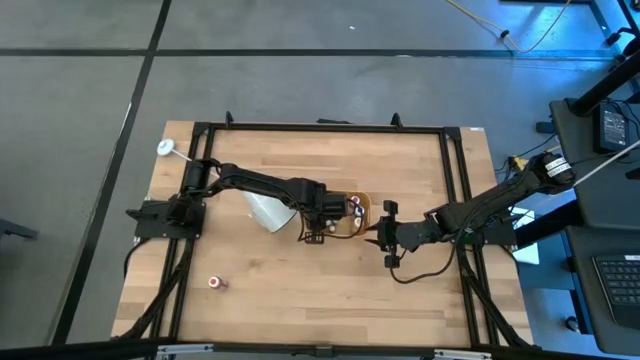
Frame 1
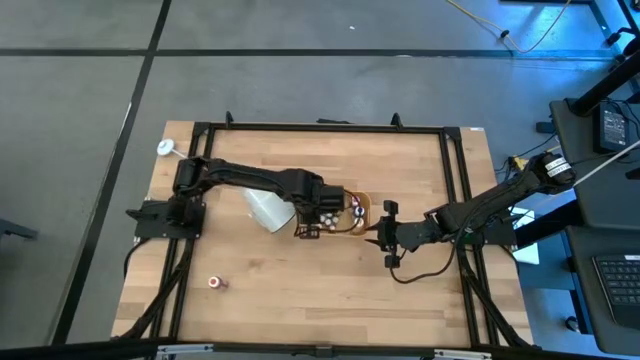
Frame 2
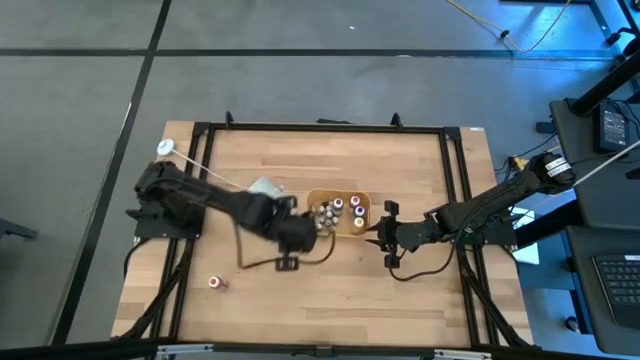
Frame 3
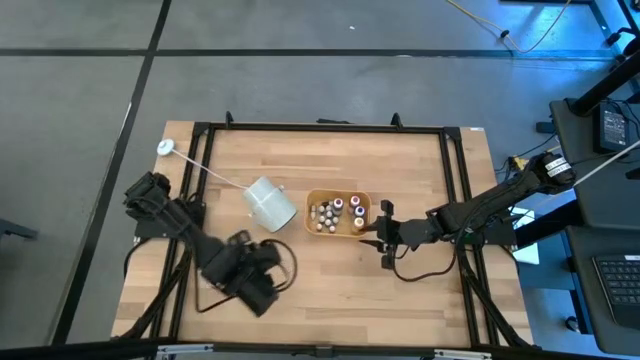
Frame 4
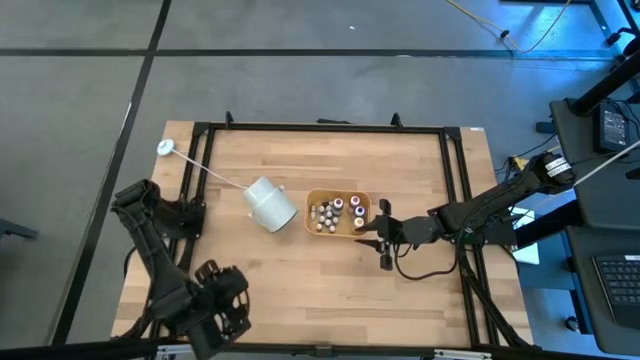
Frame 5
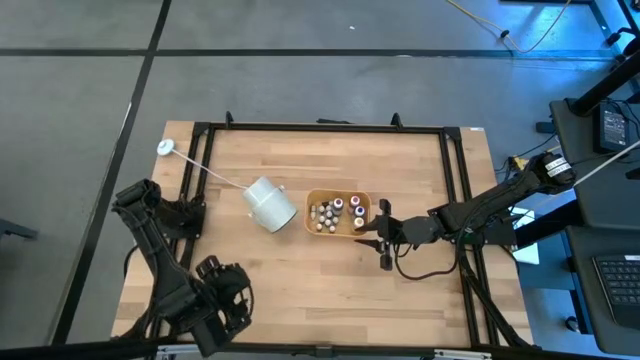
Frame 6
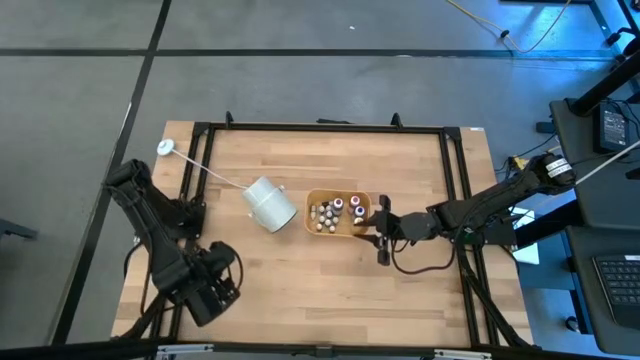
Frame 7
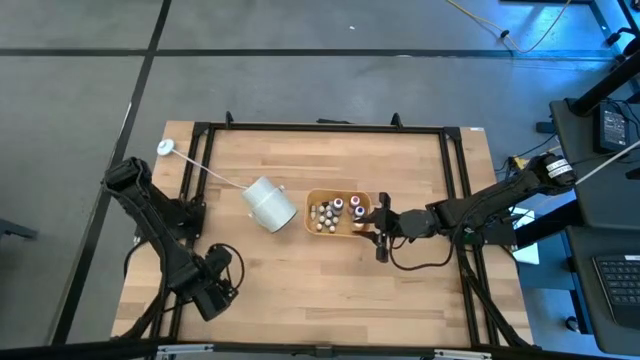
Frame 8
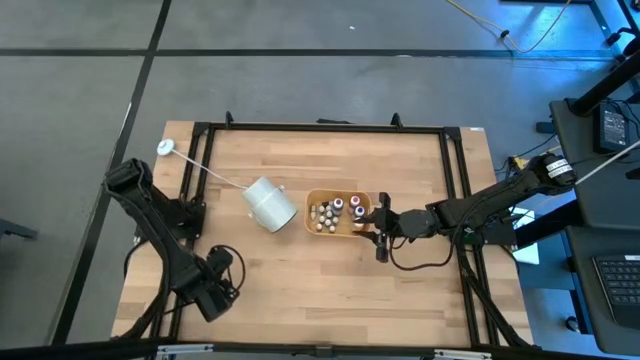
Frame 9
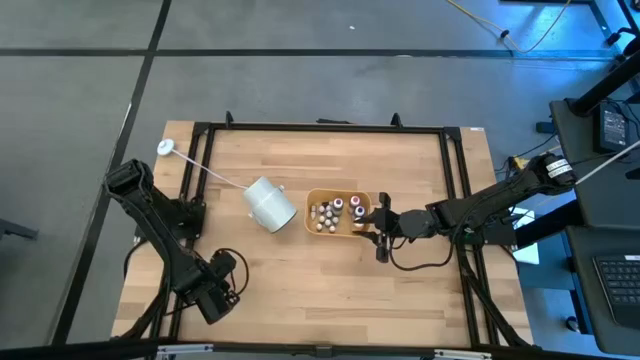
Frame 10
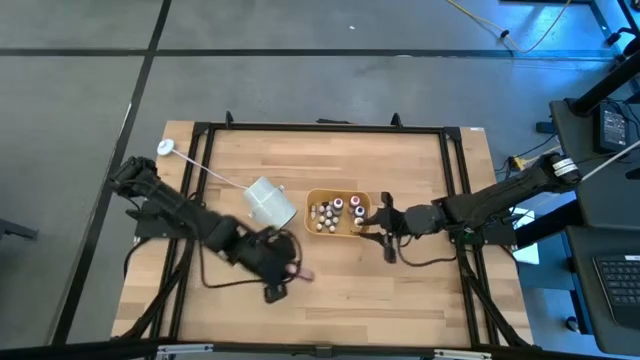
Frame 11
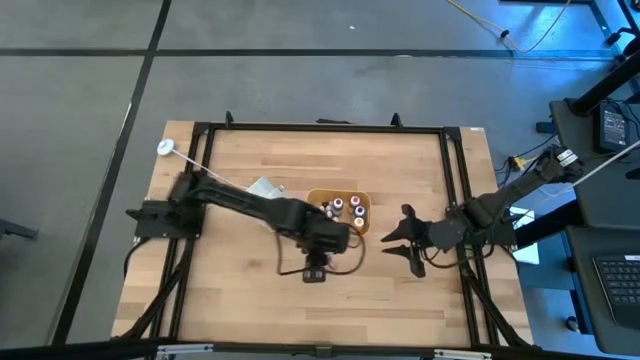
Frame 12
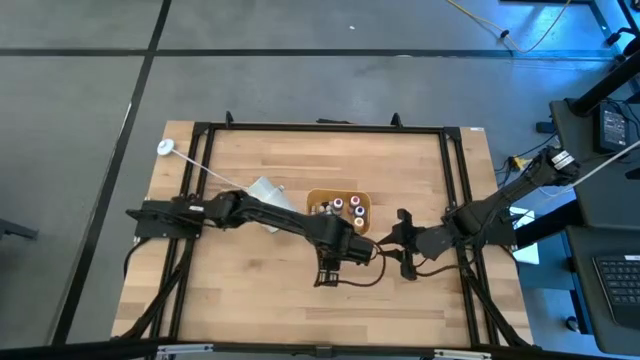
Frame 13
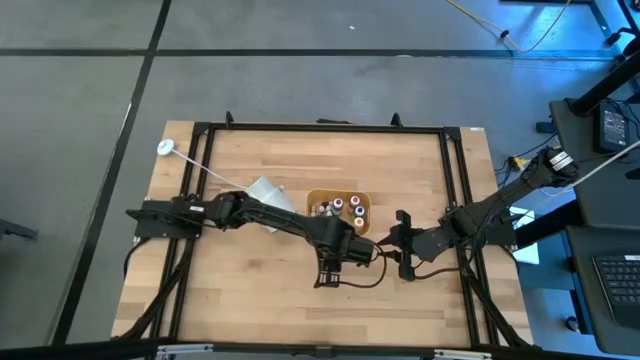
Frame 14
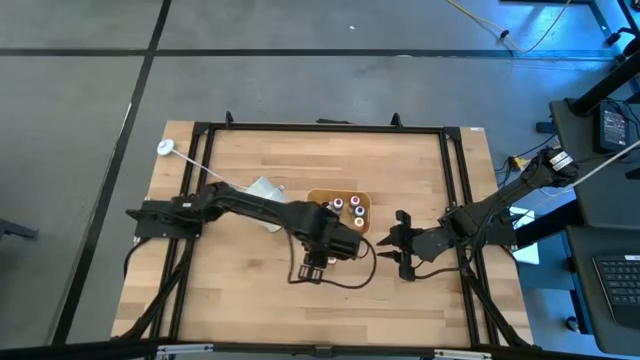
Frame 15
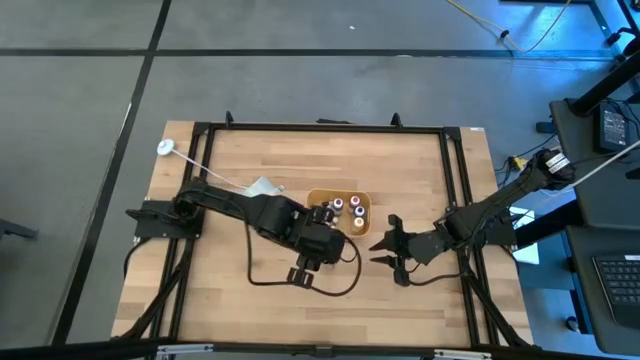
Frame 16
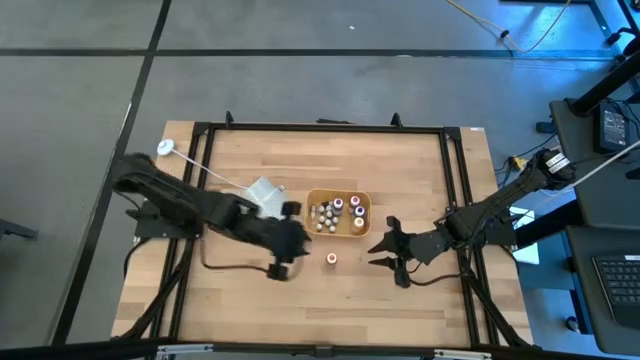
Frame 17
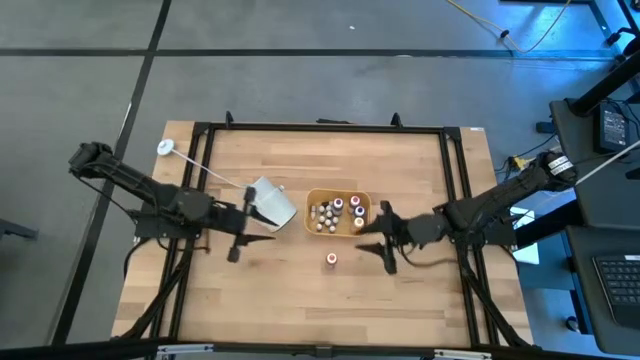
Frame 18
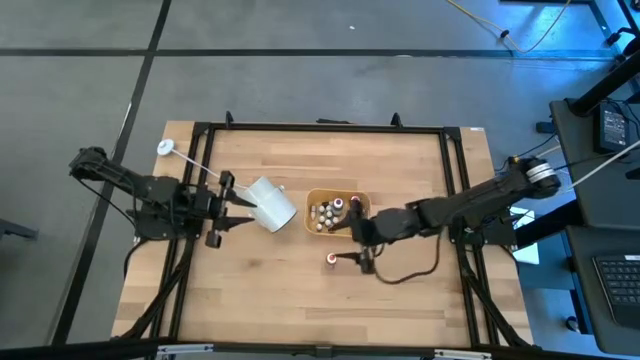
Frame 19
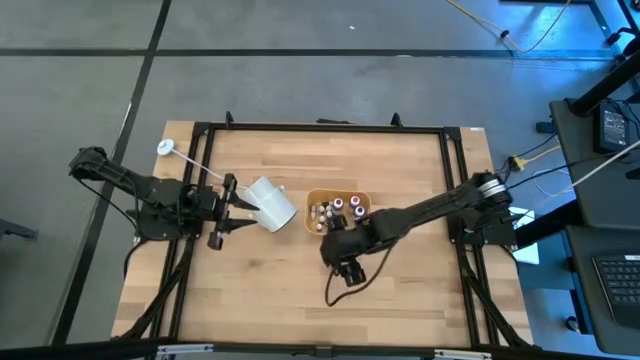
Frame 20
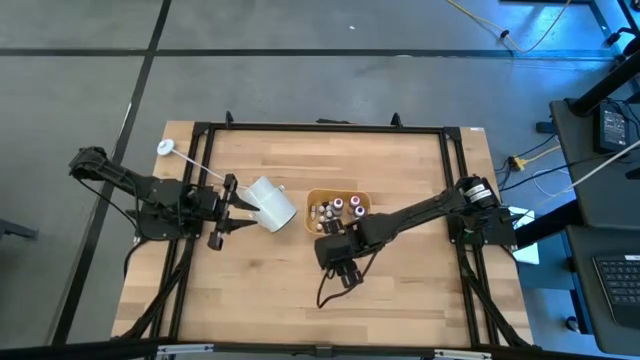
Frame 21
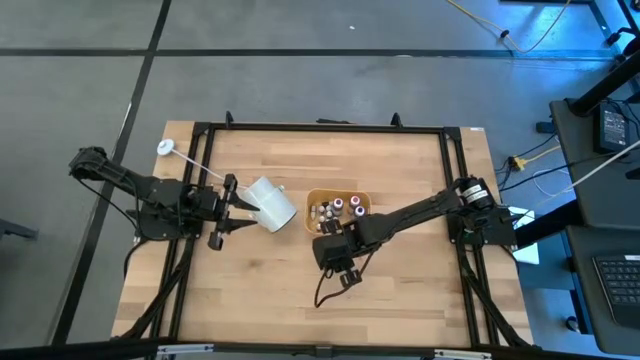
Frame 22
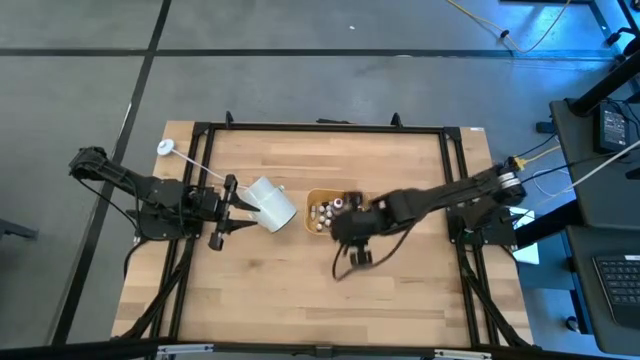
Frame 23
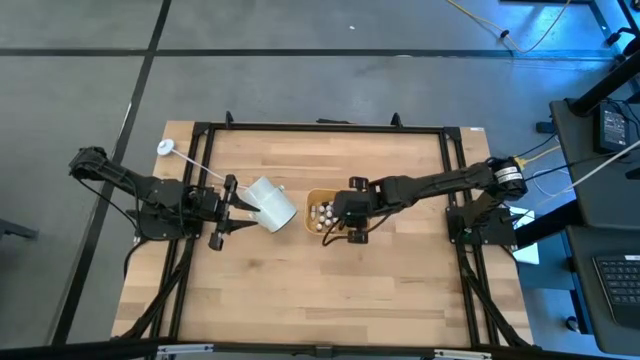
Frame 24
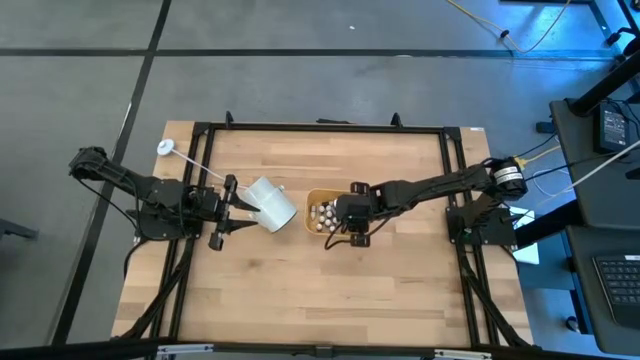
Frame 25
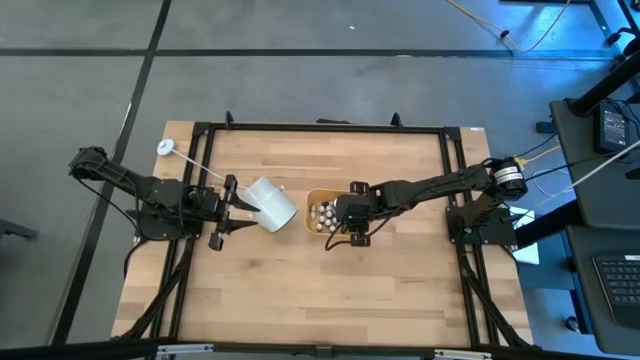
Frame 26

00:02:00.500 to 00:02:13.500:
Task: Pick & Place food coloring
Put the large orange food coloring bottle into the yellow bin

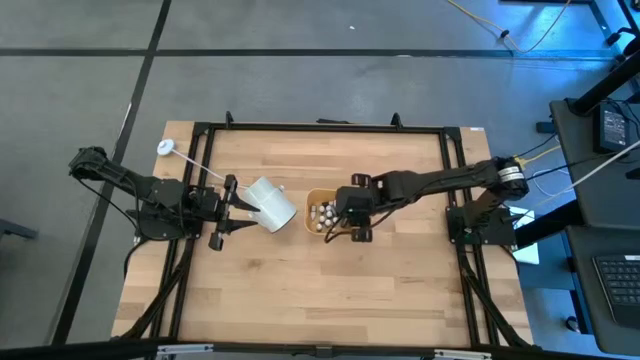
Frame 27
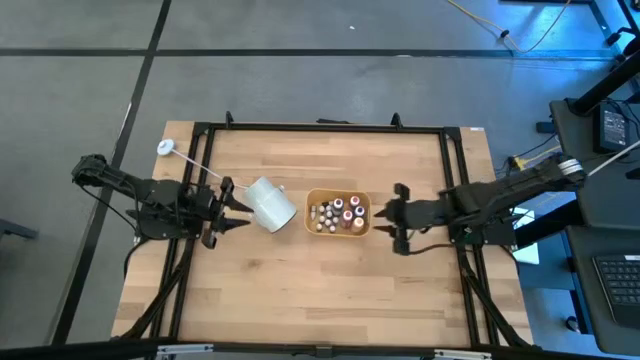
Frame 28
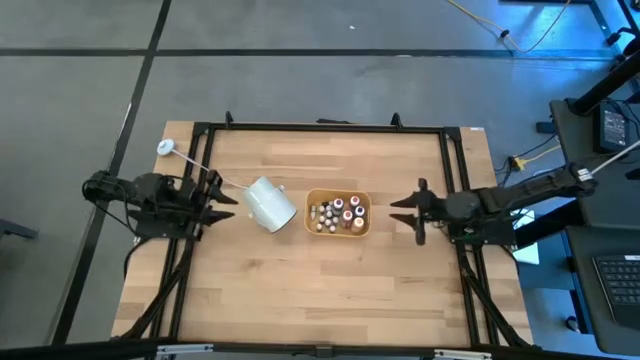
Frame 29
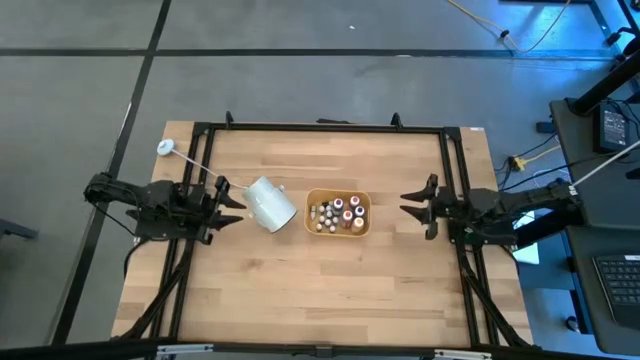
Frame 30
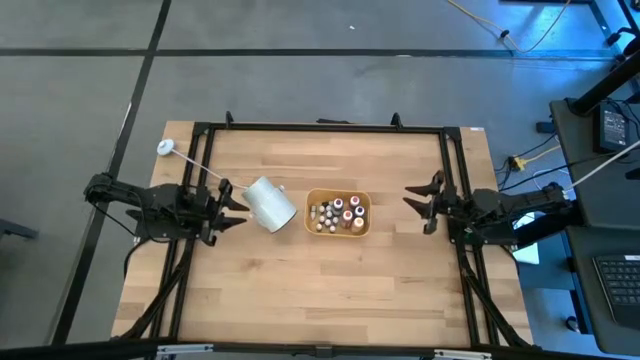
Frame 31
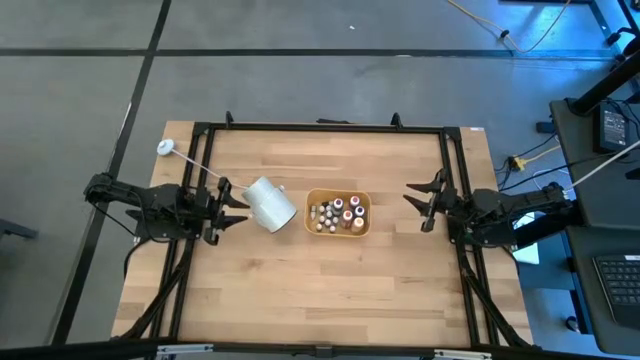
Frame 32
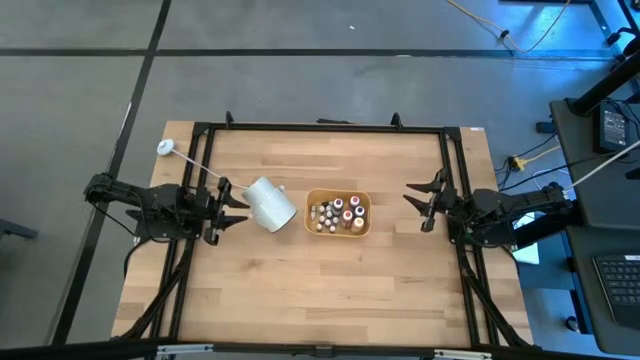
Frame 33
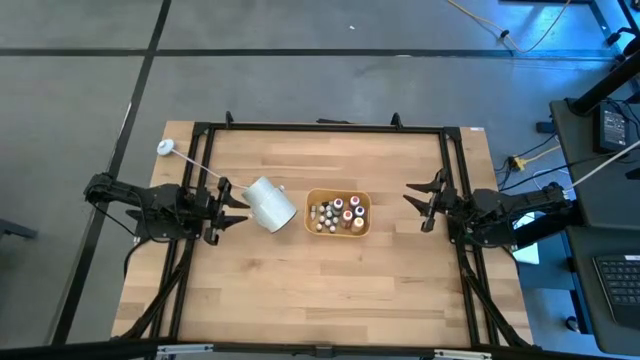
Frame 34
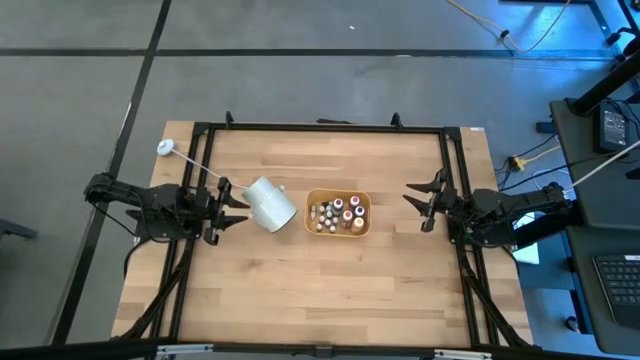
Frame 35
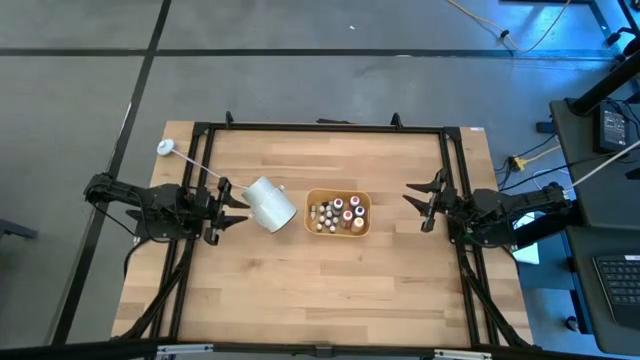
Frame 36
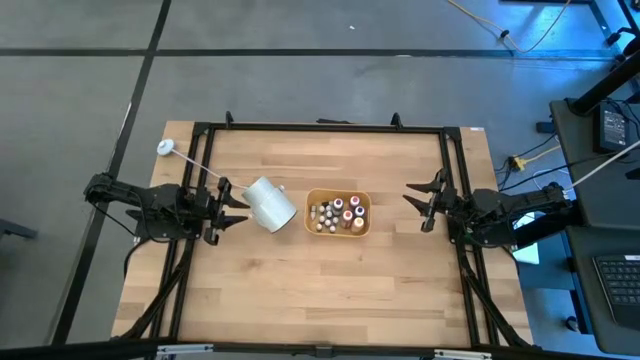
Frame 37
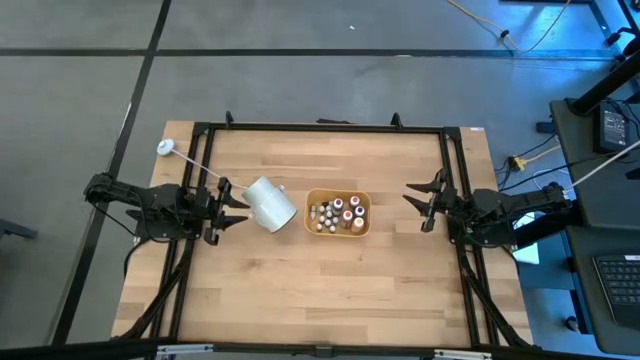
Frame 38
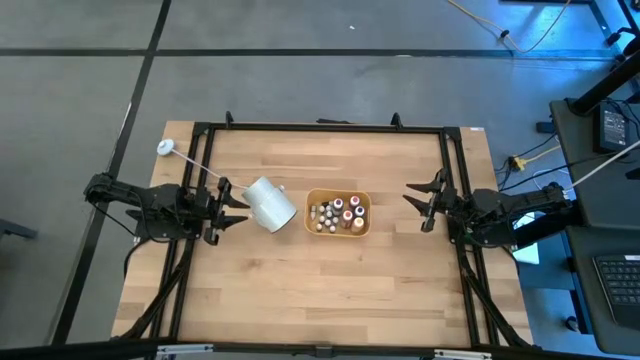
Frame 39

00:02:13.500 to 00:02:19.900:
Return to Home Position

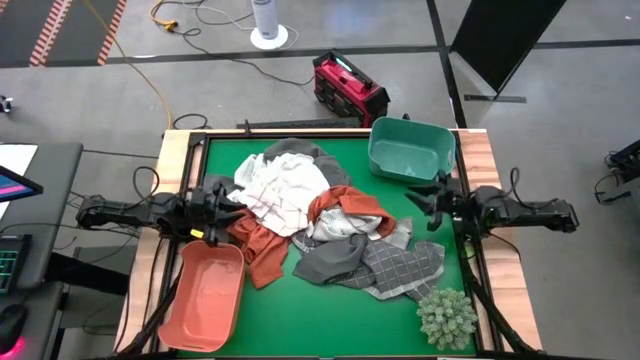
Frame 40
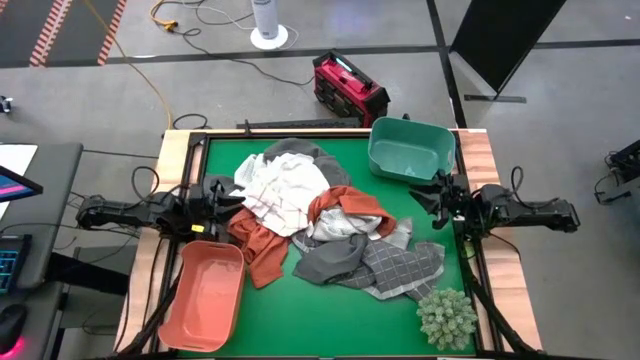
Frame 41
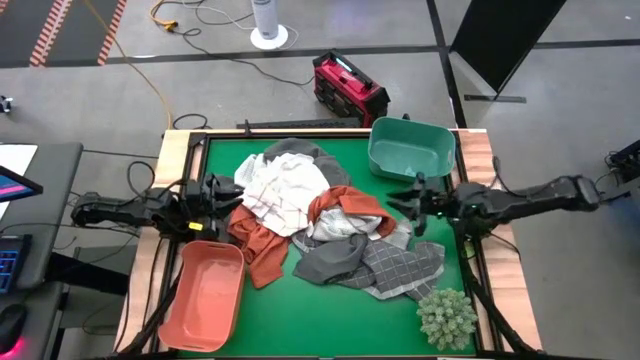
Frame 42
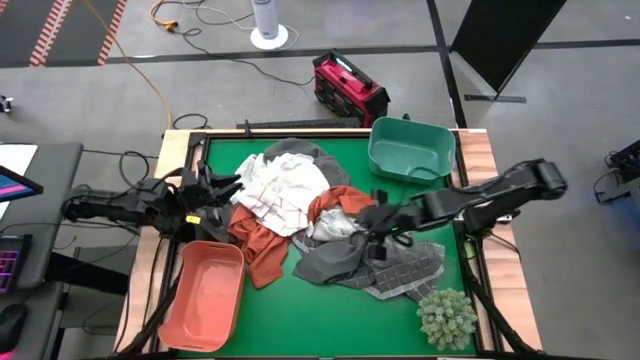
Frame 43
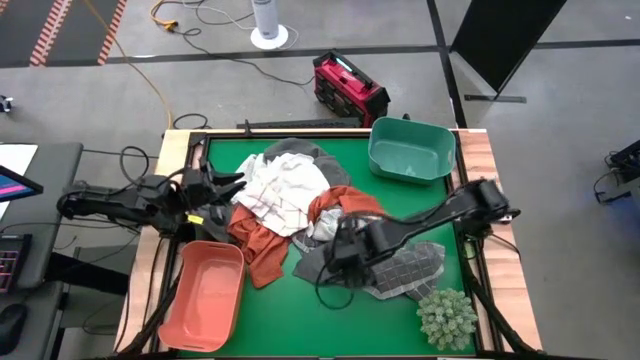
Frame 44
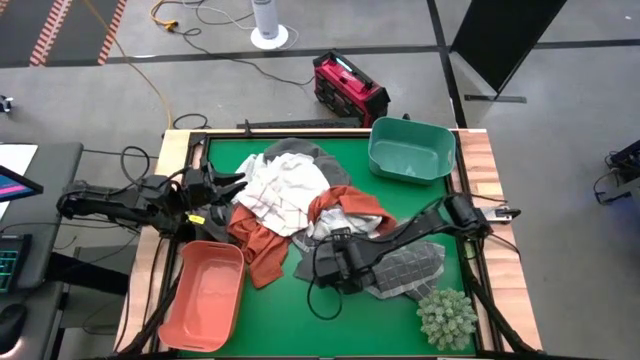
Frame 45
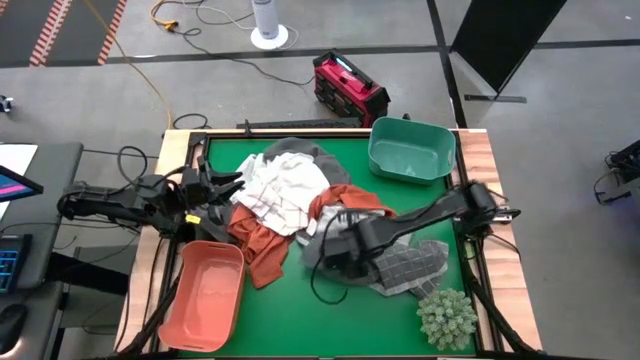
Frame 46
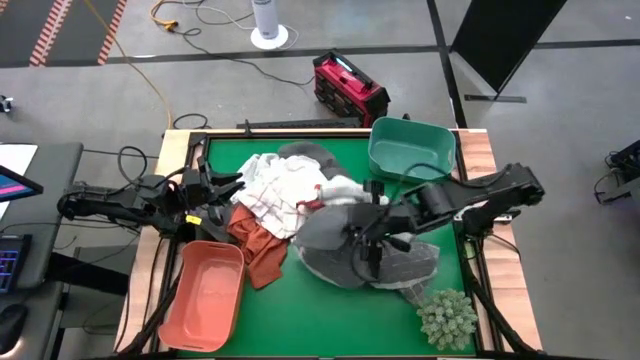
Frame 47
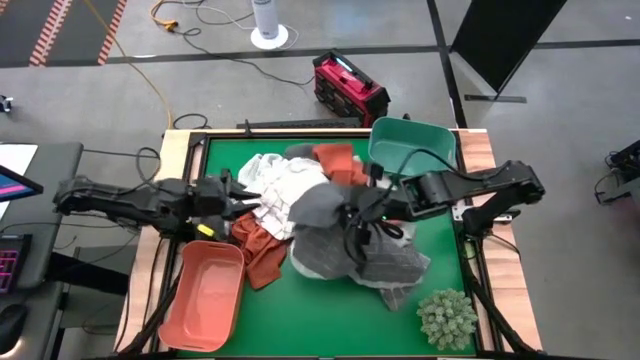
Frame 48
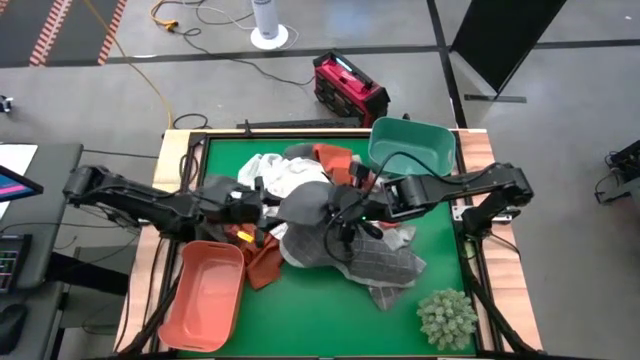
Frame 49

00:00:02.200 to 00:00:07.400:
Task: Sort towels by color in basket
Put the right gray towel into the green bin
